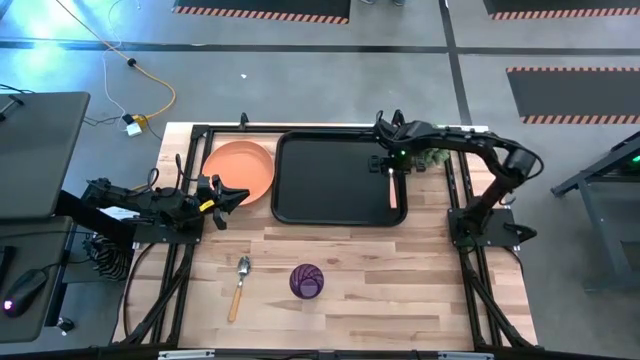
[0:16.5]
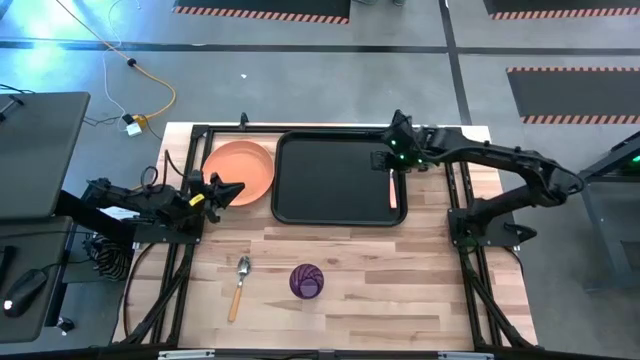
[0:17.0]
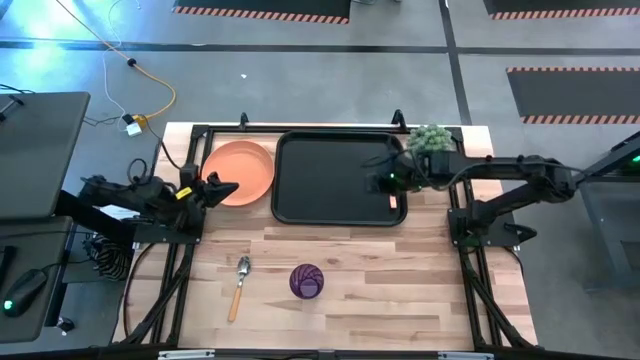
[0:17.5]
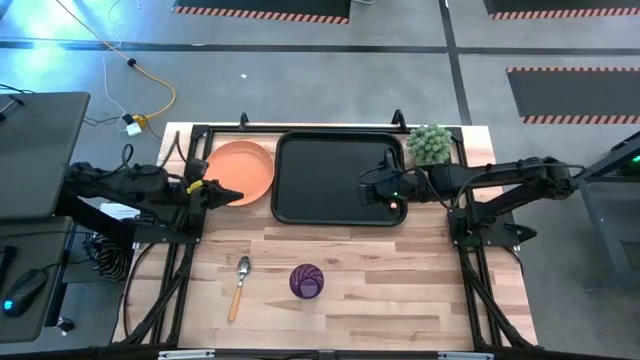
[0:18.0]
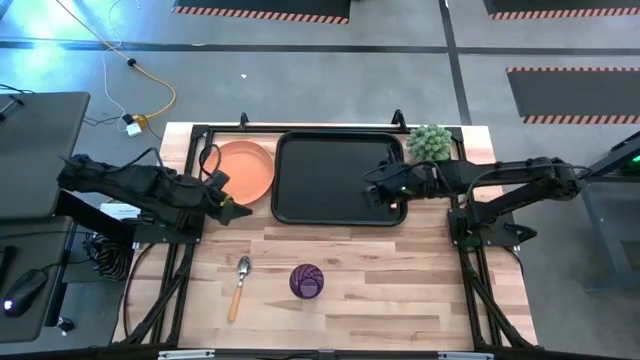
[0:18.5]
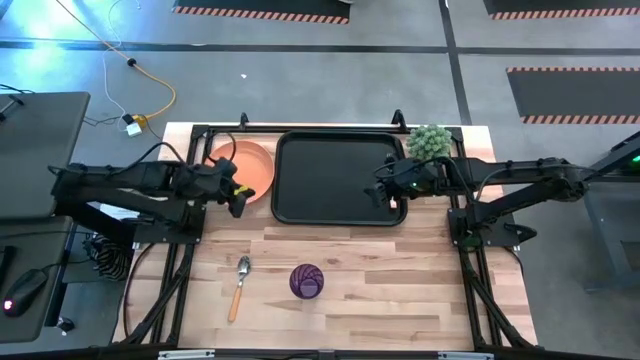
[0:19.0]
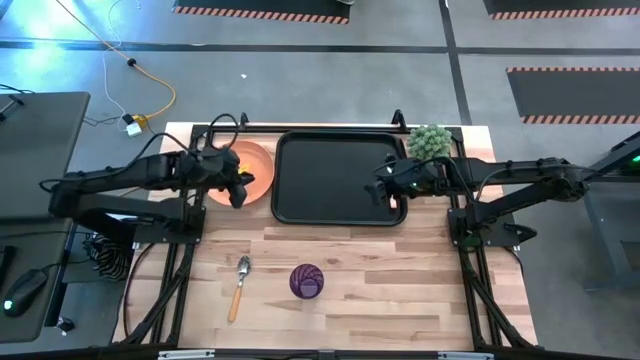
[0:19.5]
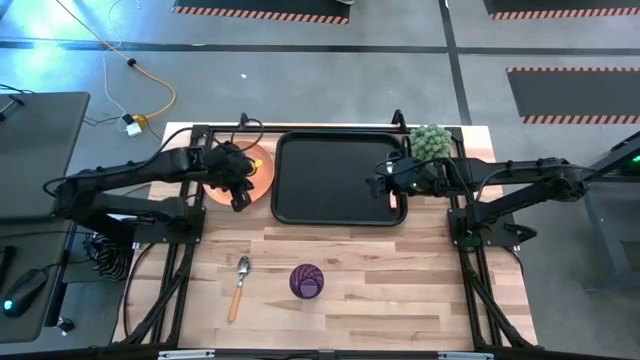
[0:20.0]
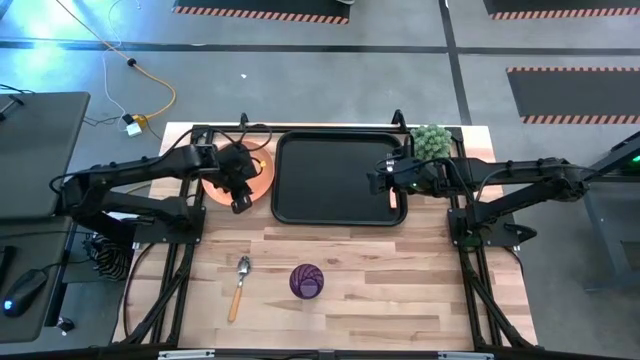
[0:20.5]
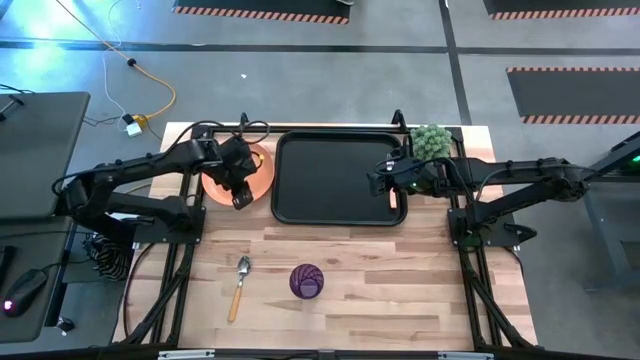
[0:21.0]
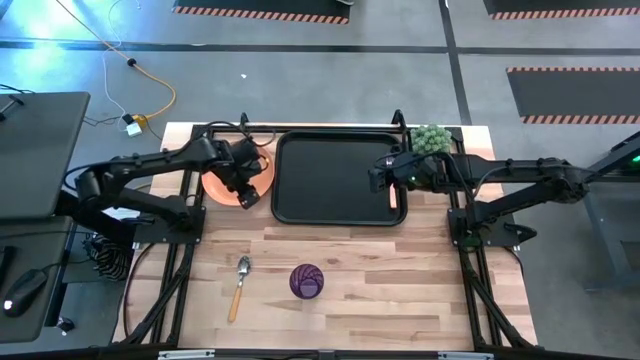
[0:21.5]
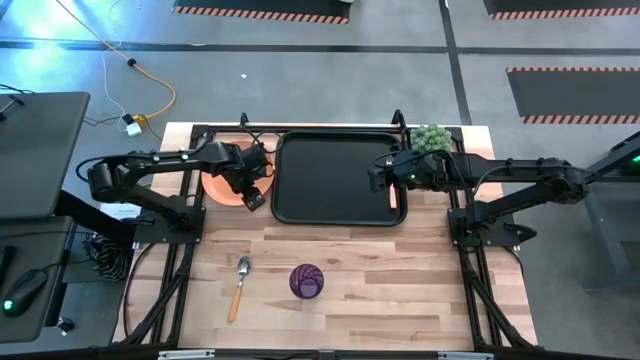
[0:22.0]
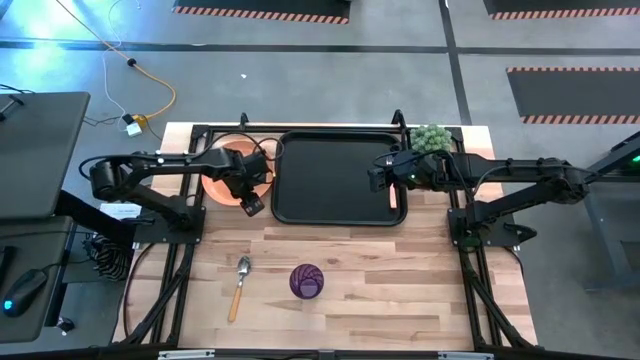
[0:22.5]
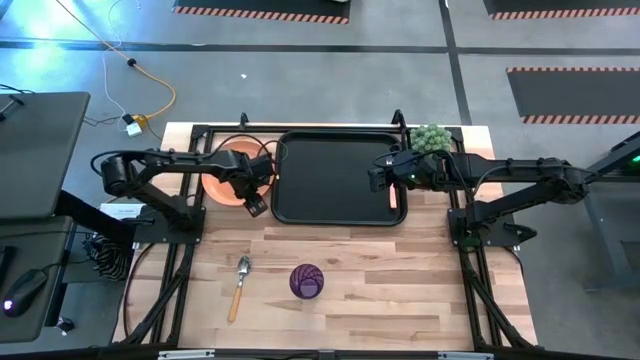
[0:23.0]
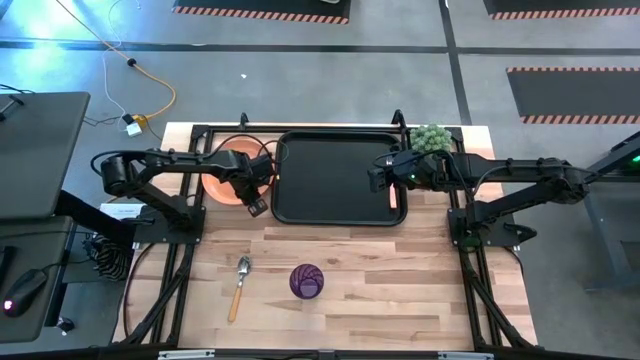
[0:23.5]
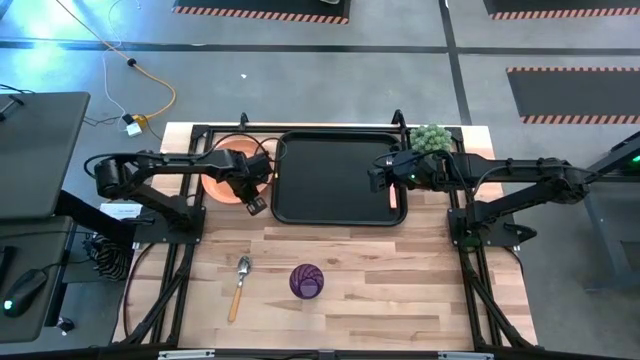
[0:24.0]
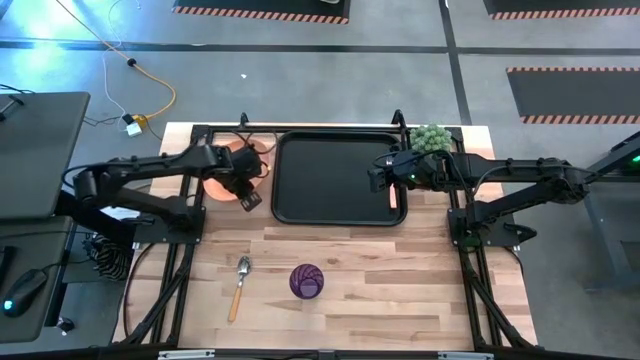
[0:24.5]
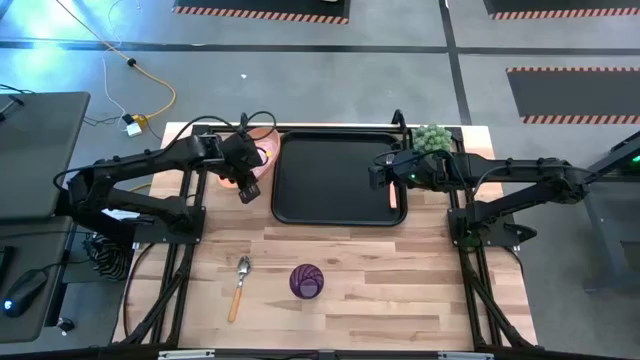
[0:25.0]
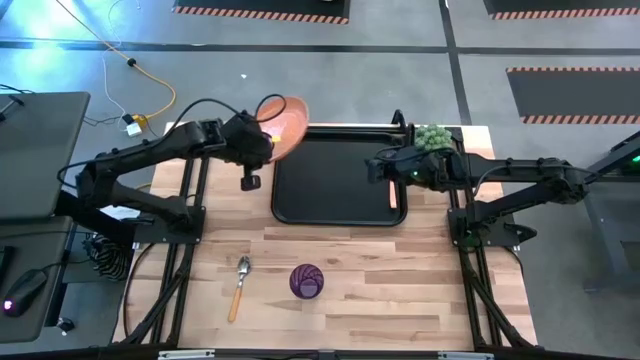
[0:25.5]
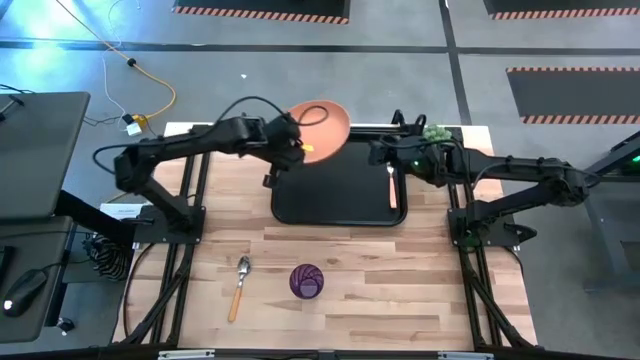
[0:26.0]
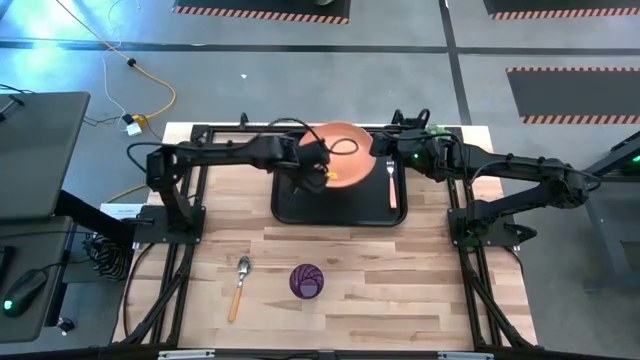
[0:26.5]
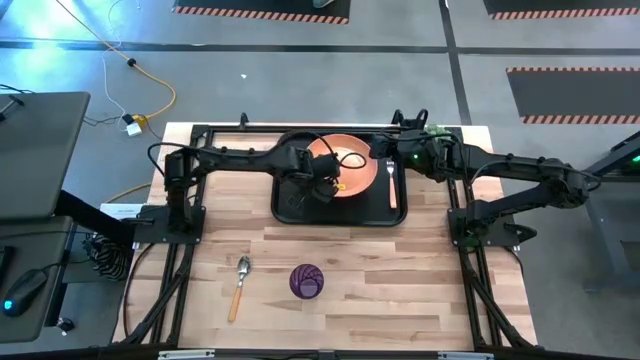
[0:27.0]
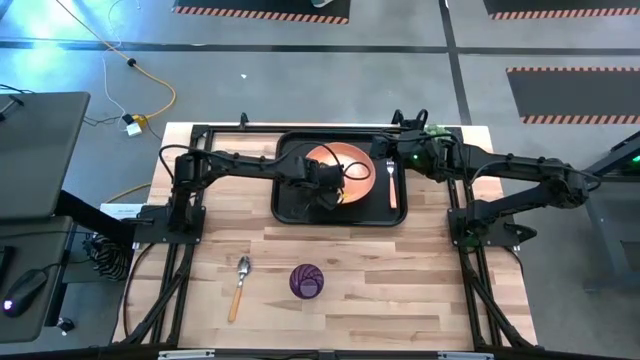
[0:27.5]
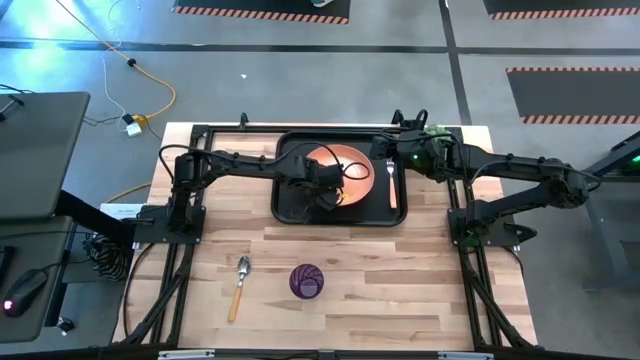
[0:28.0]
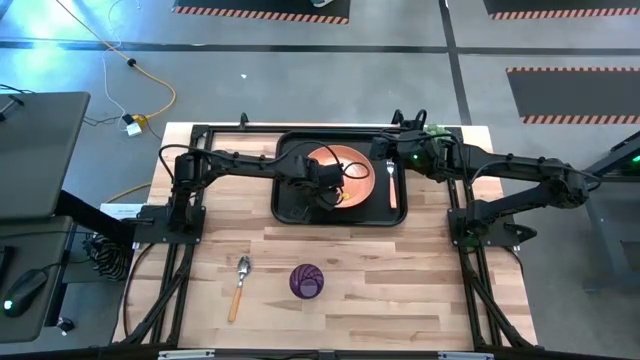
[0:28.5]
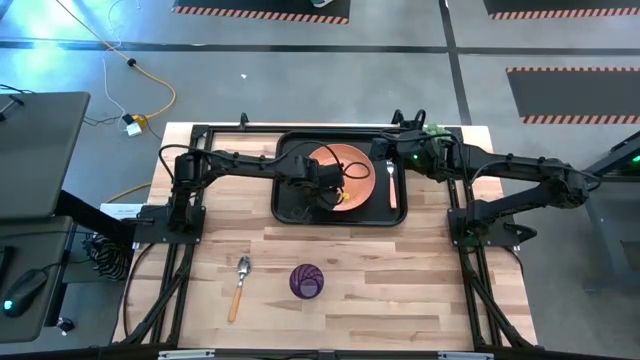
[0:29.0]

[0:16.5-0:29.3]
Task: Pick and place plate/cup/fork/spoon on tray
Put the orange plate on the black serving tray
